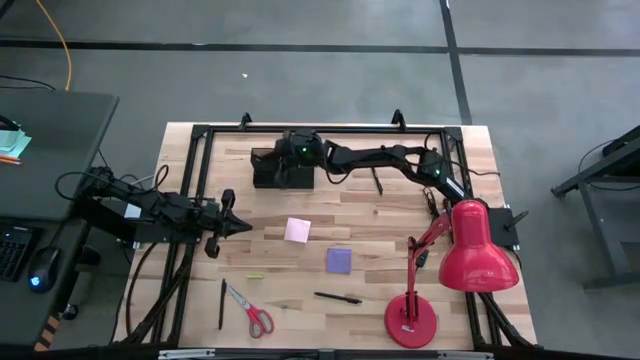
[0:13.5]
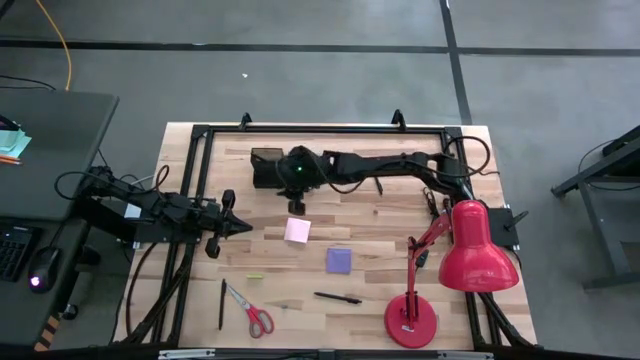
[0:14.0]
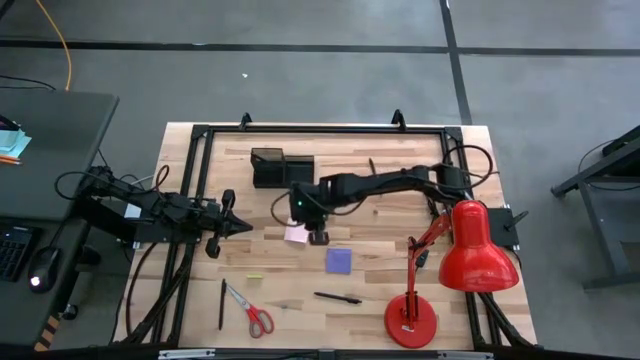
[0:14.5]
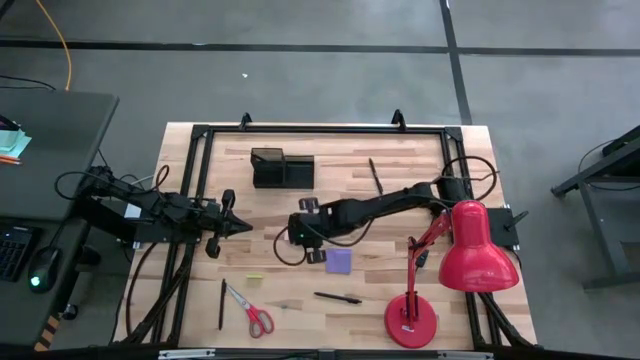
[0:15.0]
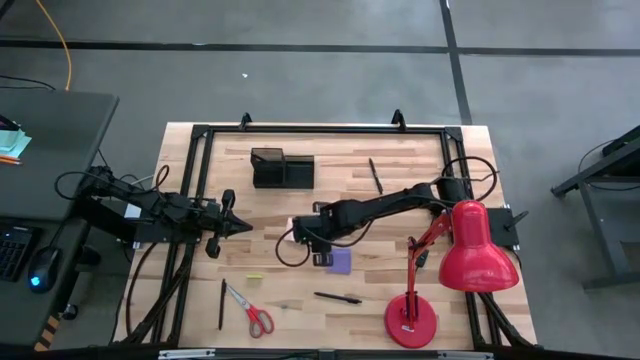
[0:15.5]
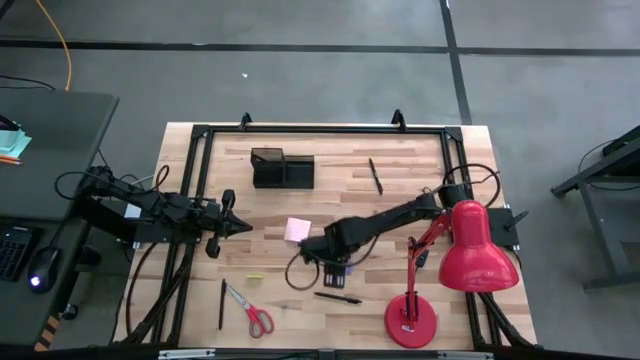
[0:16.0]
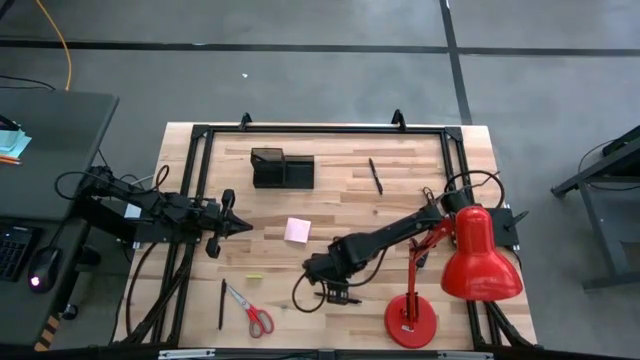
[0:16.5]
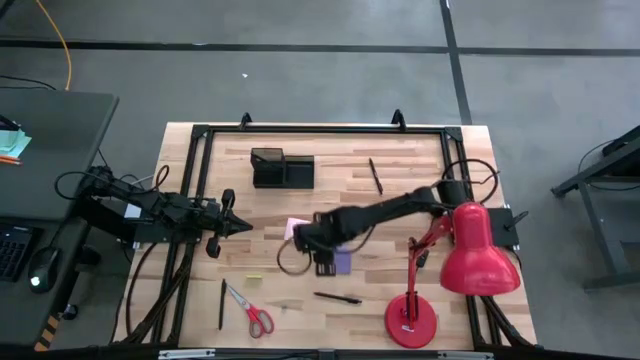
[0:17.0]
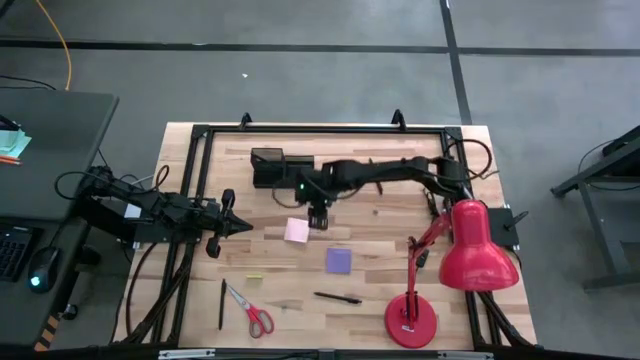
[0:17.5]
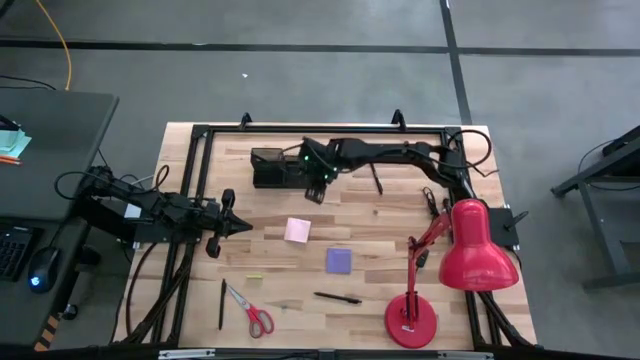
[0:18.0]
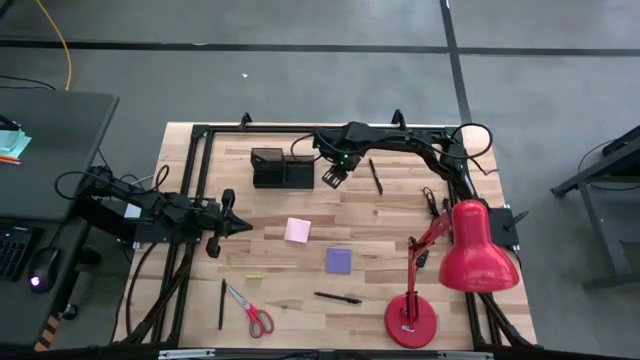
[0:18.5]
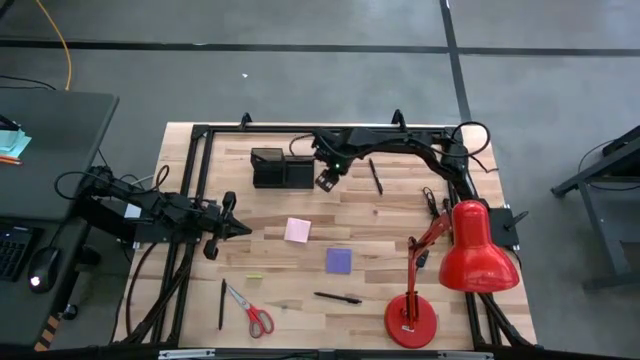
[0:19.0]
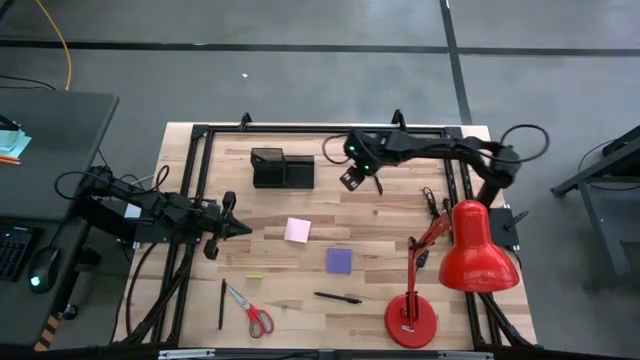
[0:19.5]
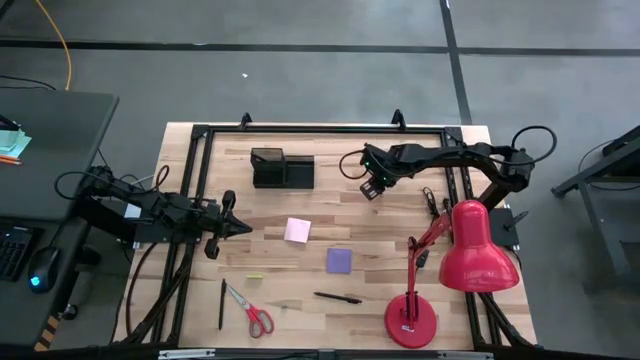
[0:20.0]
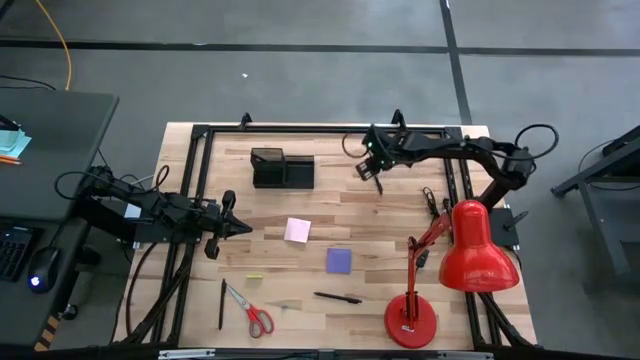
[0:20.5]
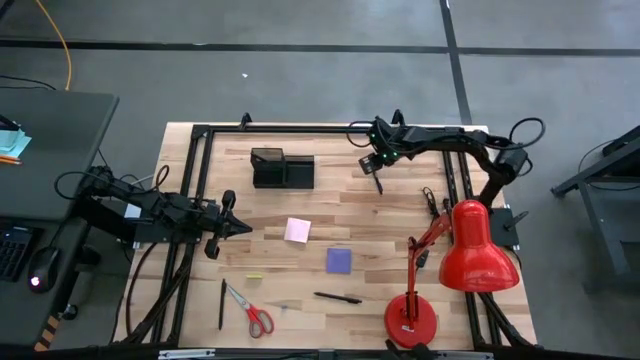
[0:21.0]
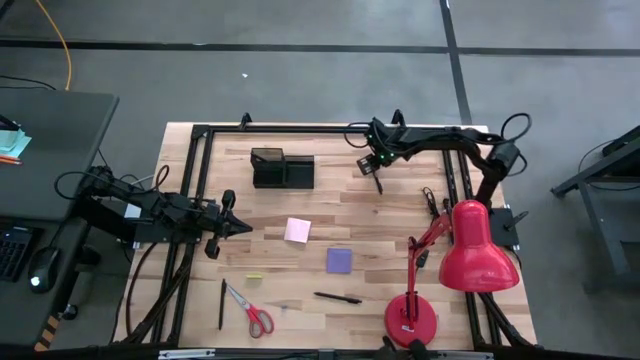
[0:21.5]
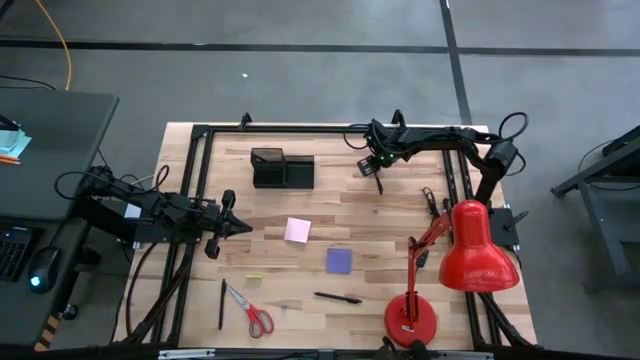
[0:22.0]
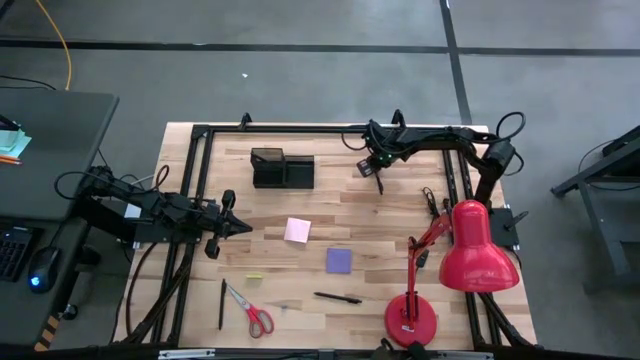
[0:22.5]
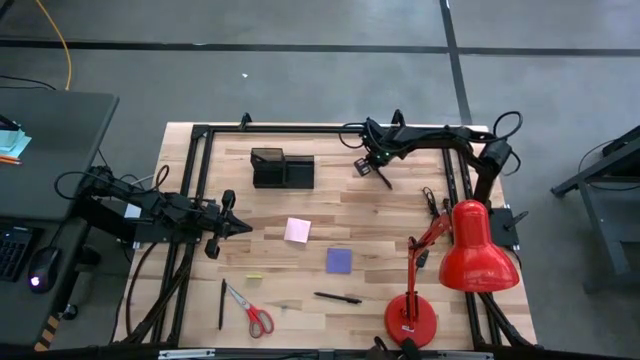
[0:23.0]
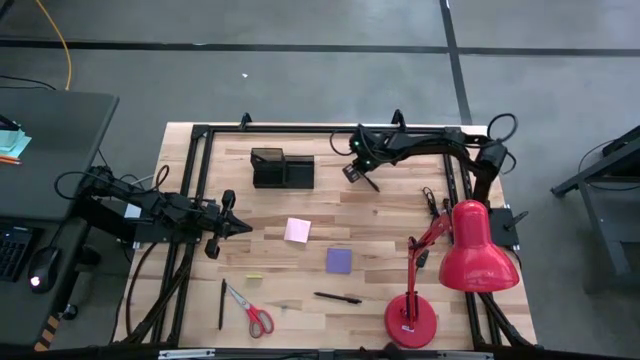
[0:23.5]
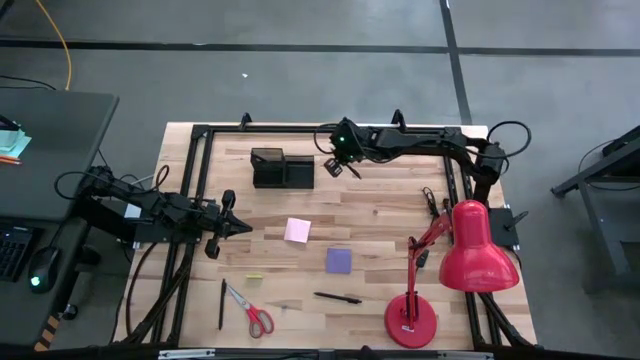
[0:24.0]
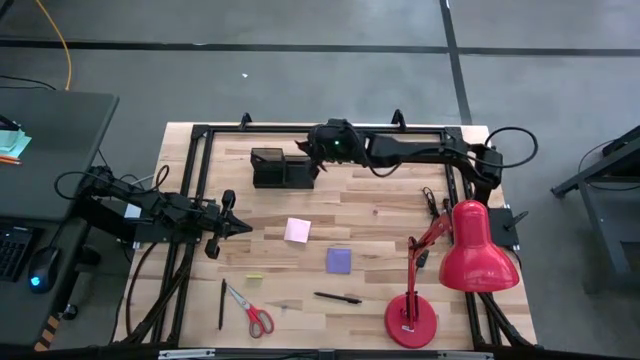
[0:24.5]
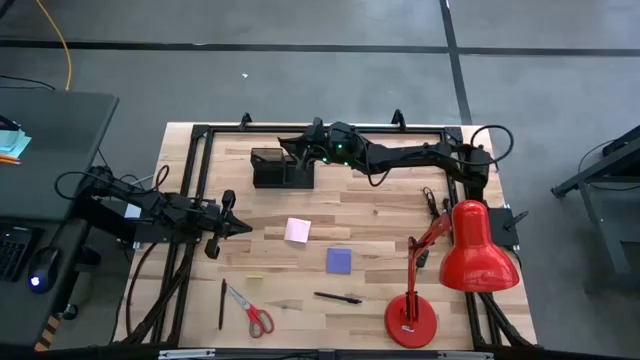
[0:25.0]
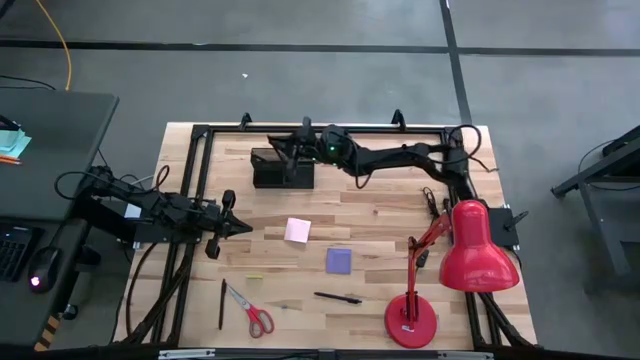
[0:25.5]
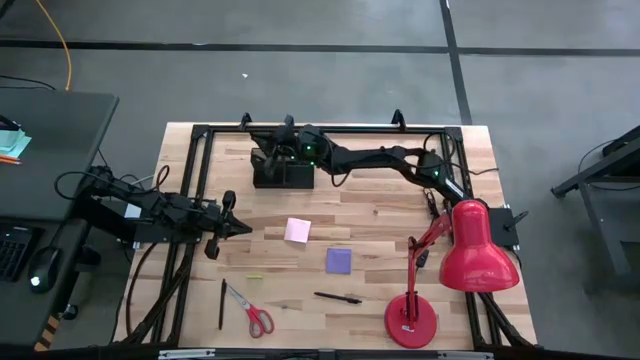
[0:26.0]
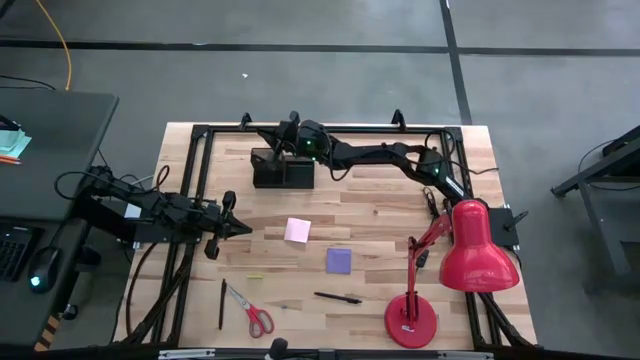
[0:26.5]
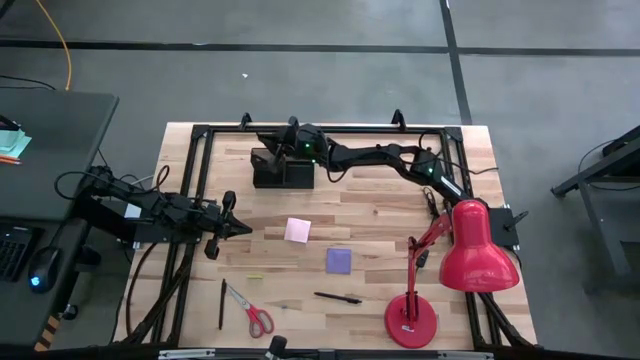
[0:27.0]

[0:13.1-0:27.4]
Task: Pick and place office supplies into organizer
Put the black pen into the black desk organizer

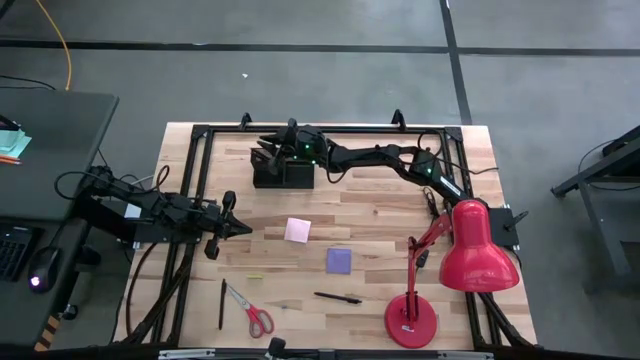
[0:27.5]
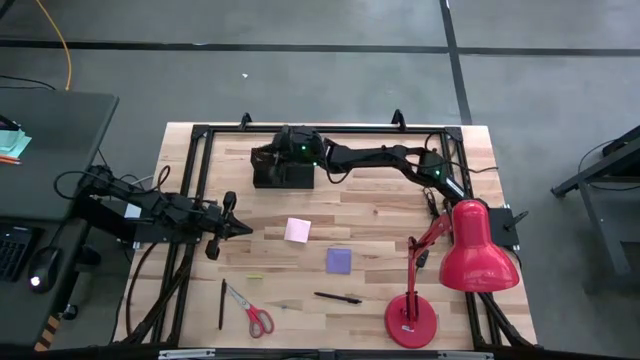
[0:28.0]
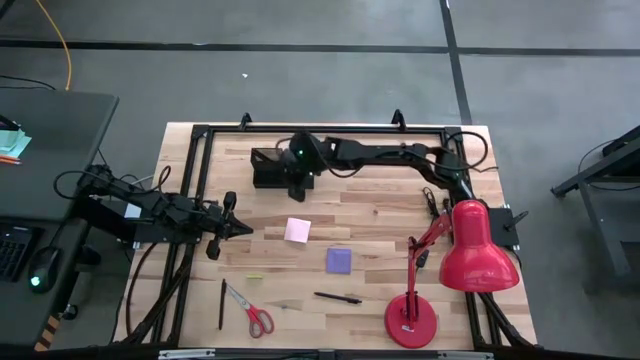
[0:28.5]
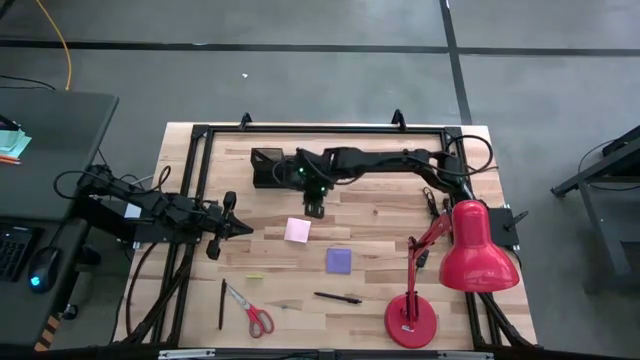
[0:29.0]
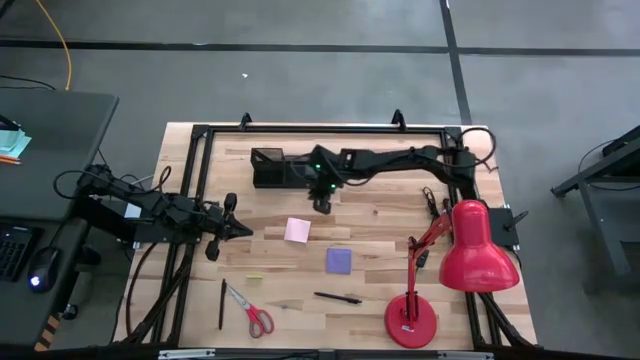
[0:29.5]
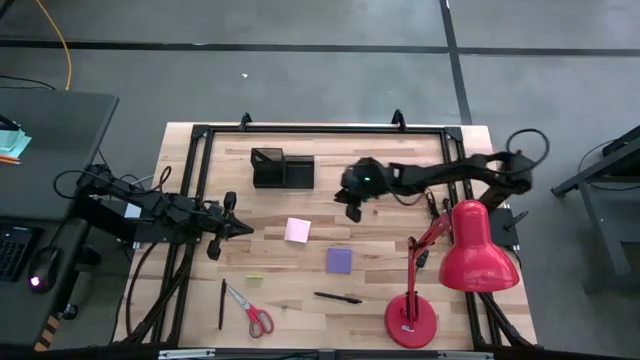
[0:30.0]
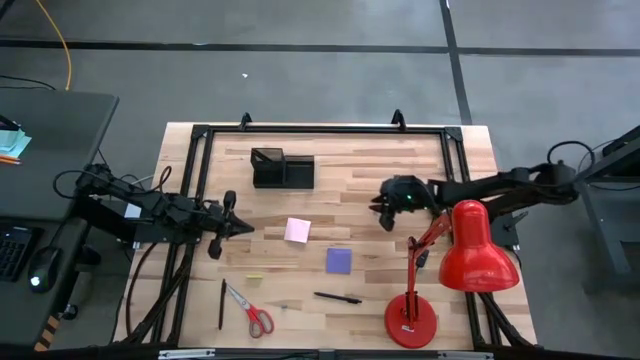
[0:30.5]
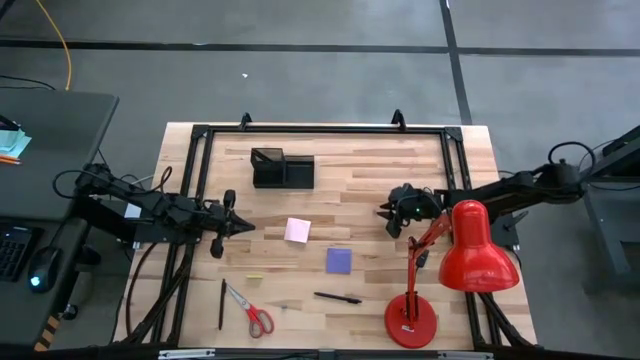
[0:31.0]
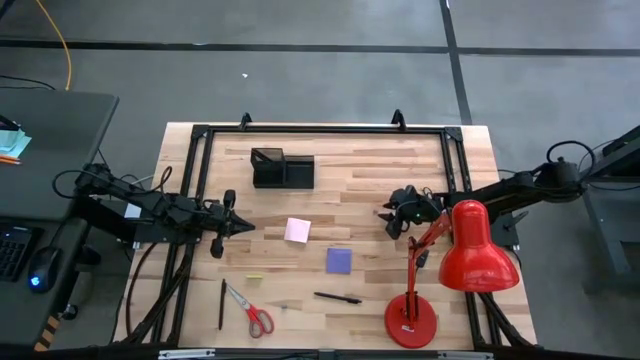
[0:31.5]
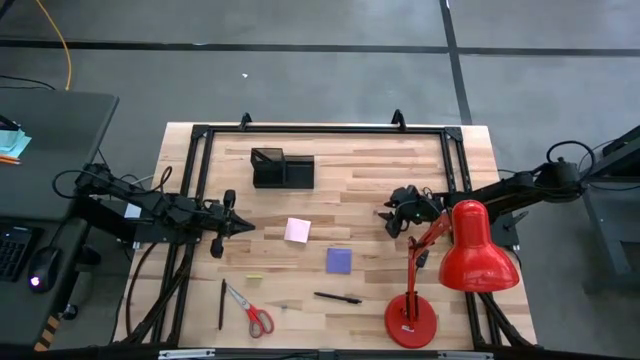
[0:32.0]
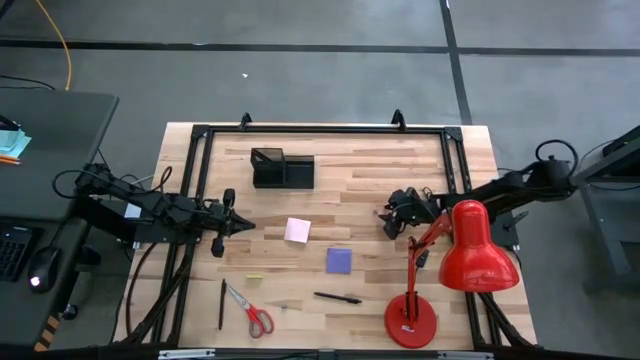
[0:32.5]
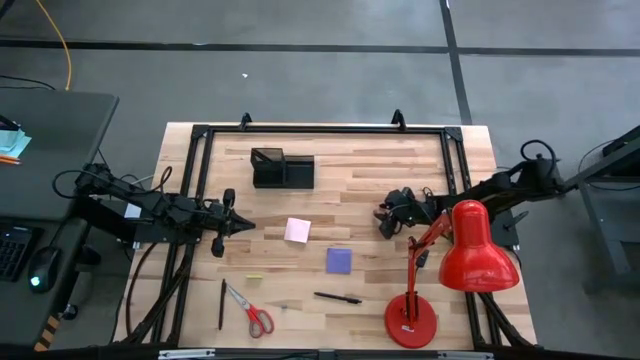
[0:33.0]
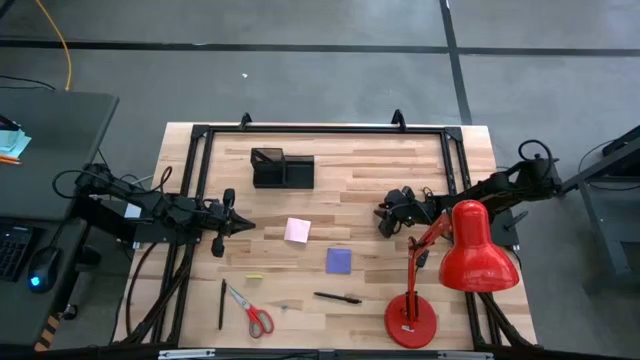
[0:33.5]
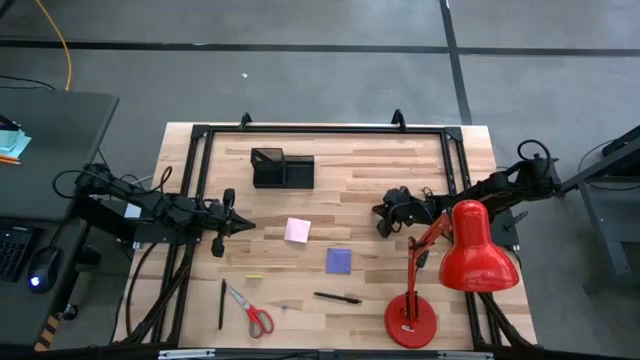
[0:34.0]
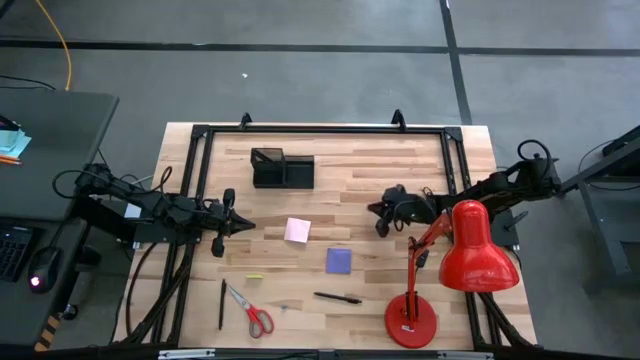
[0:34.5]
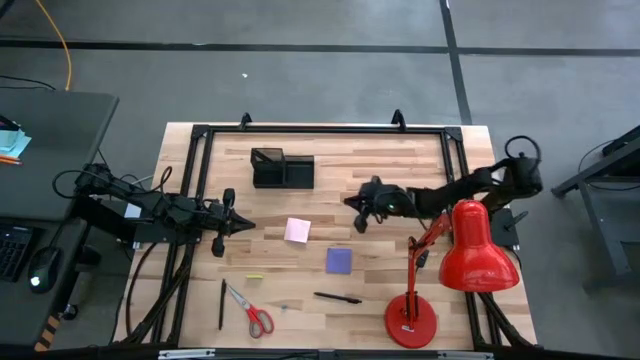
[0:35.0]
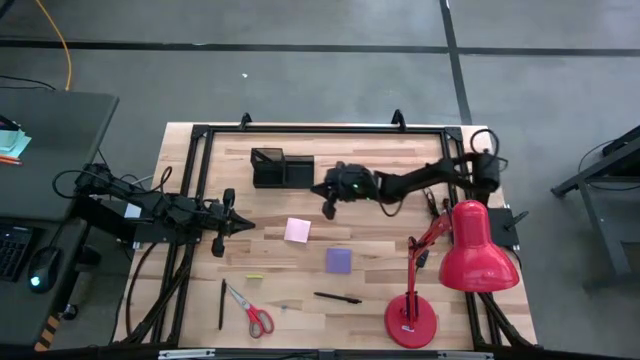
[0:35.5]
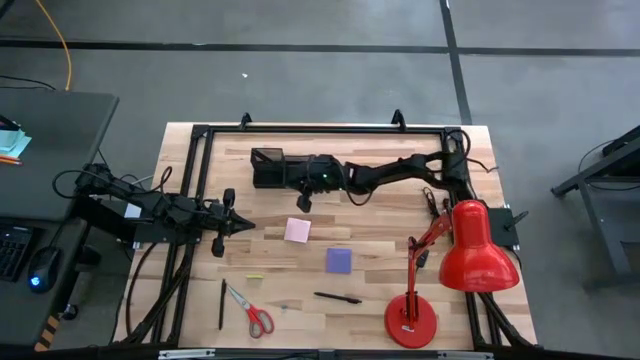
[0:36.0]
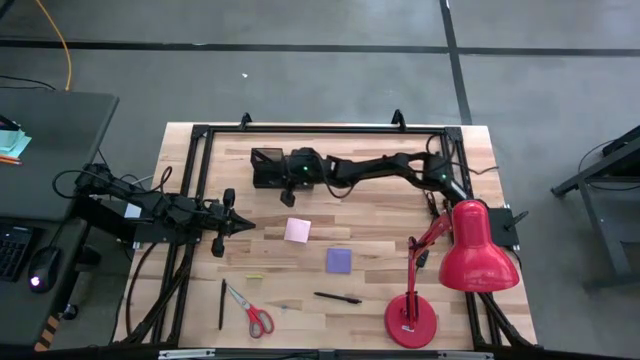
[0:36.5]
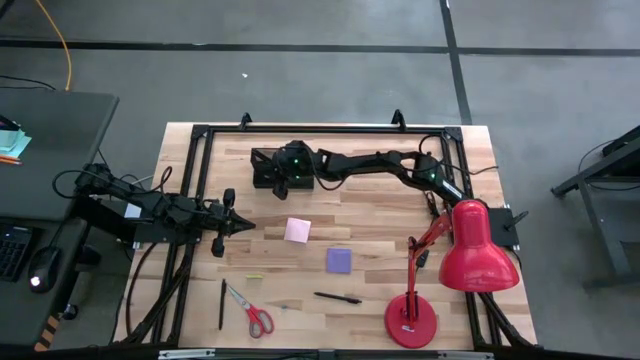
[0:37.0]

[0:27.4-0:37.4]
Put the pink binder clip into the black desk organizer
